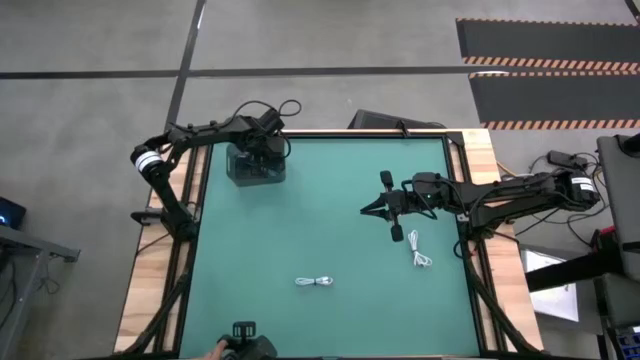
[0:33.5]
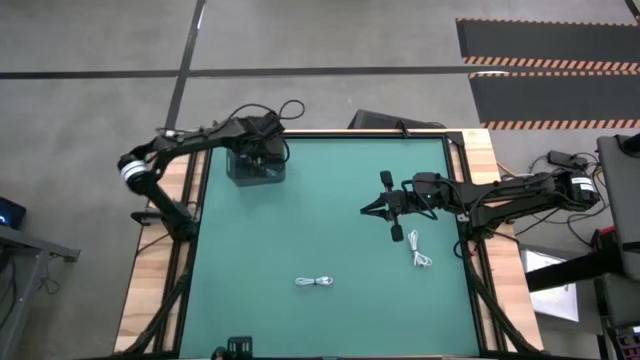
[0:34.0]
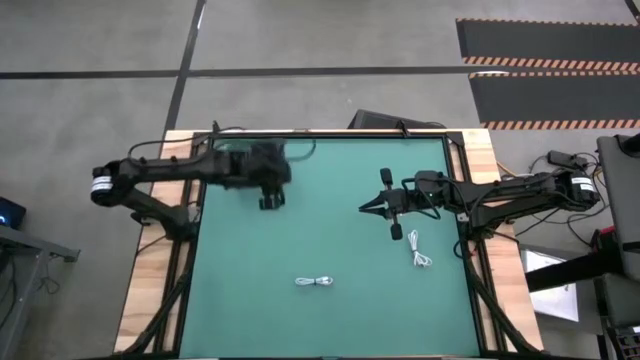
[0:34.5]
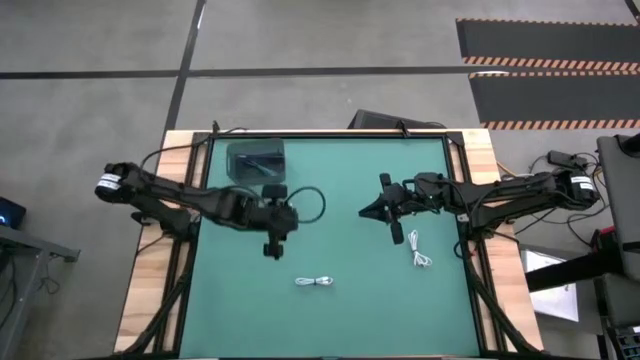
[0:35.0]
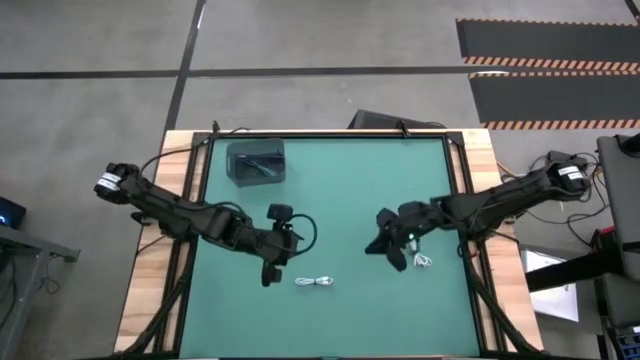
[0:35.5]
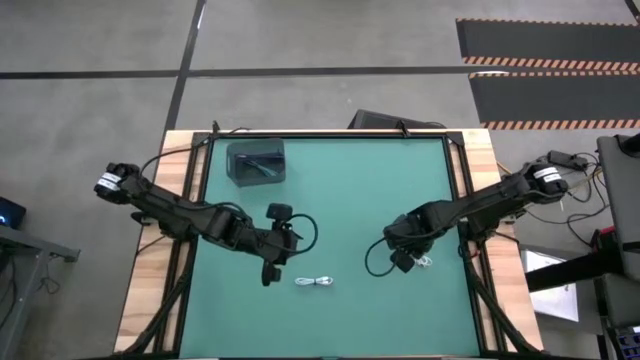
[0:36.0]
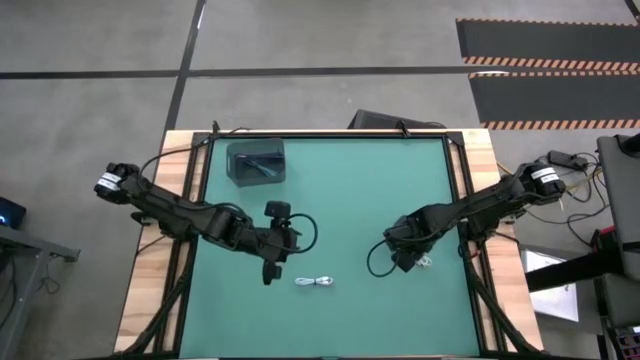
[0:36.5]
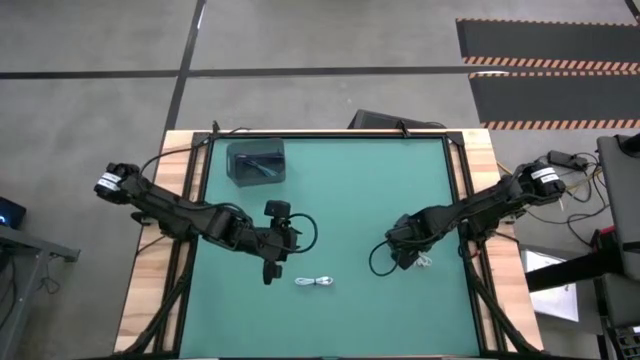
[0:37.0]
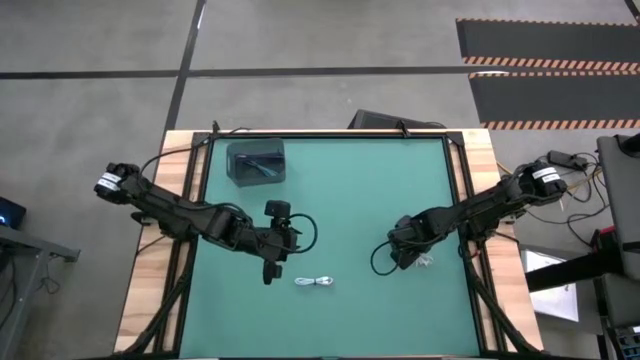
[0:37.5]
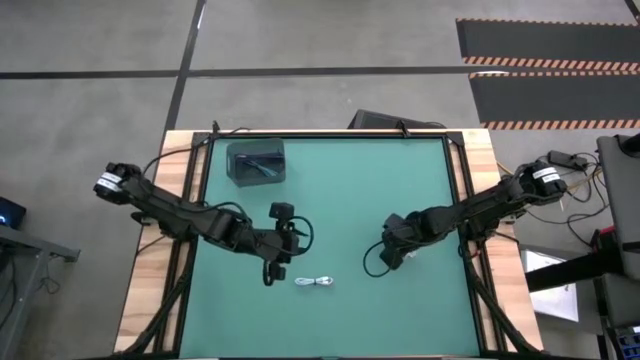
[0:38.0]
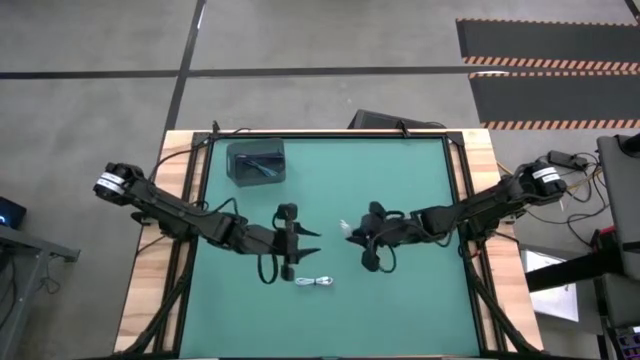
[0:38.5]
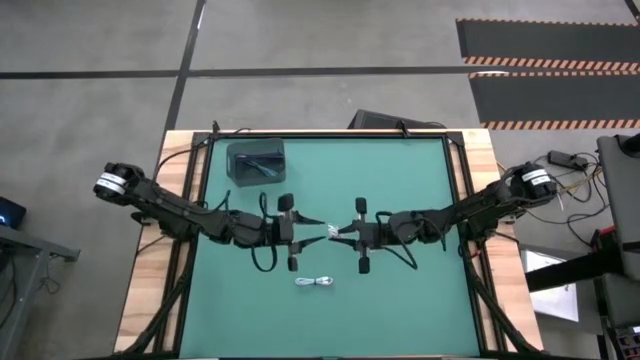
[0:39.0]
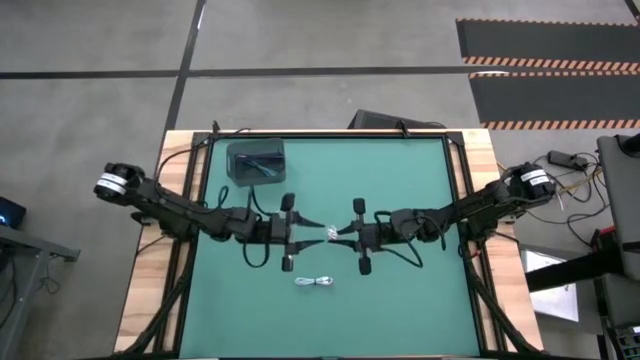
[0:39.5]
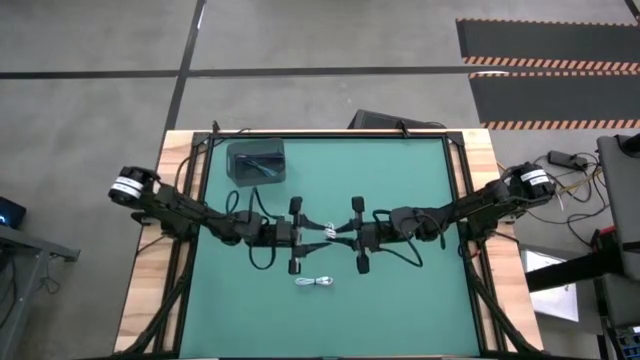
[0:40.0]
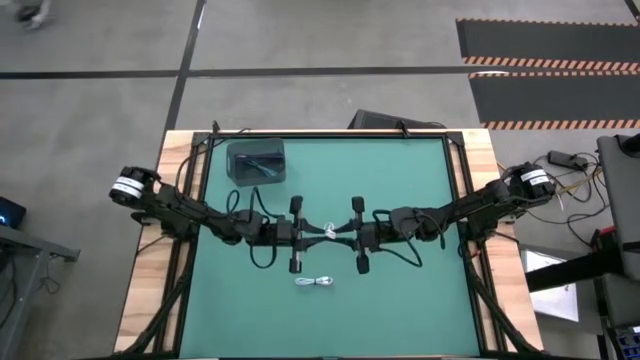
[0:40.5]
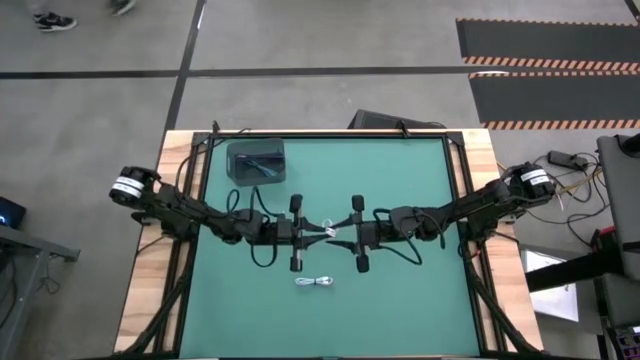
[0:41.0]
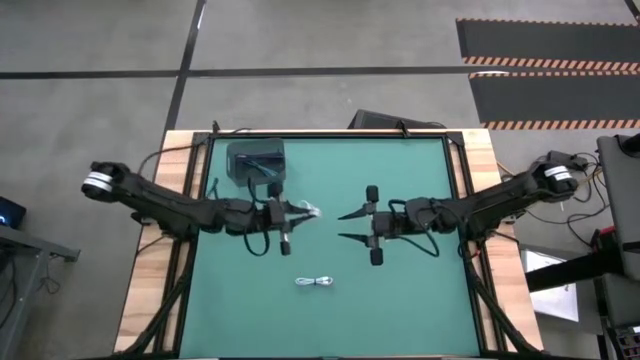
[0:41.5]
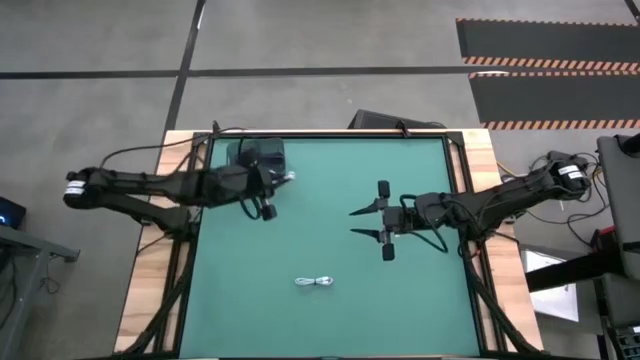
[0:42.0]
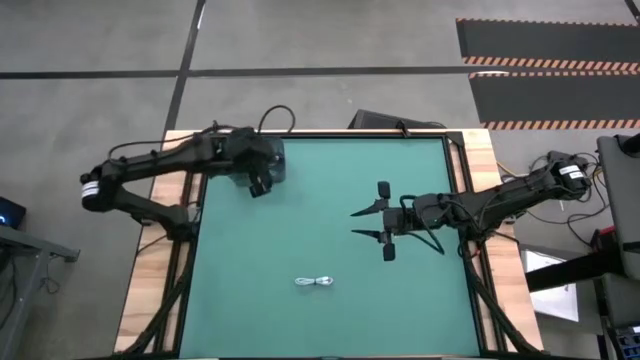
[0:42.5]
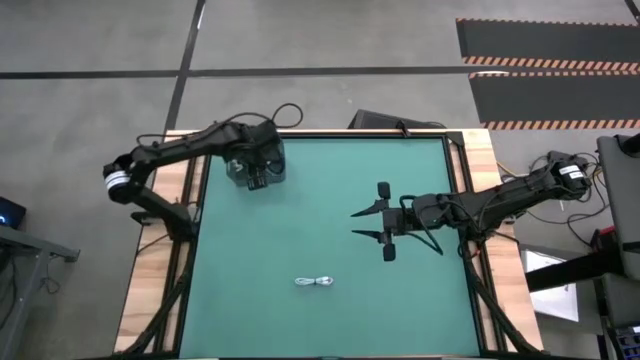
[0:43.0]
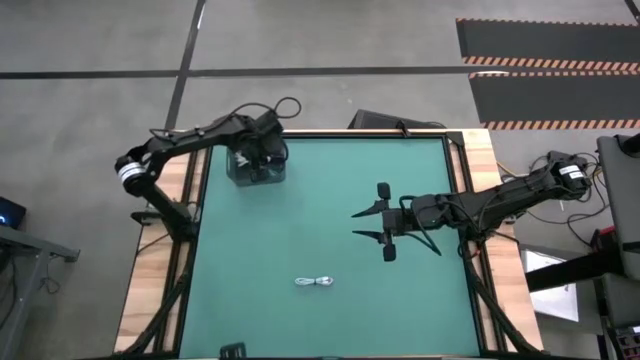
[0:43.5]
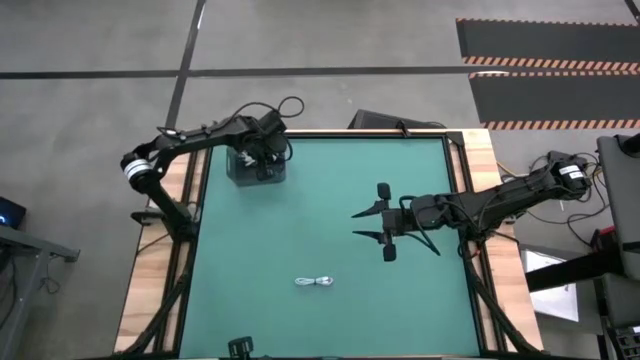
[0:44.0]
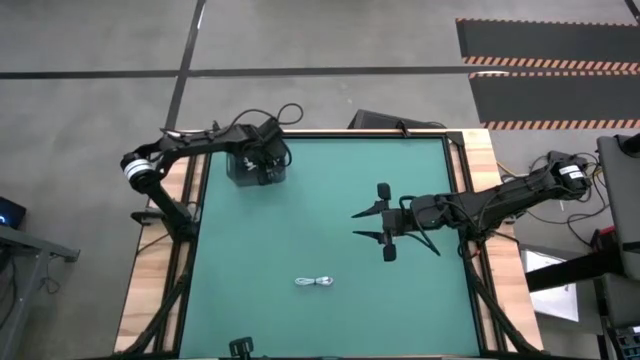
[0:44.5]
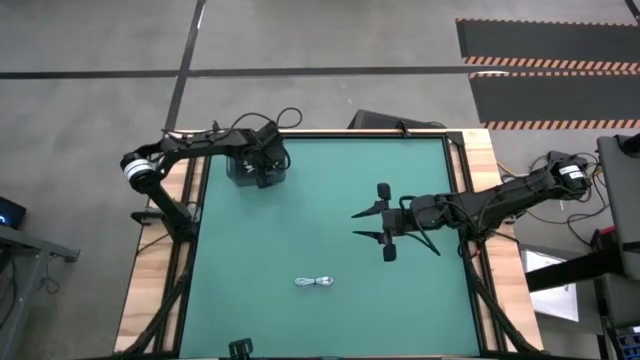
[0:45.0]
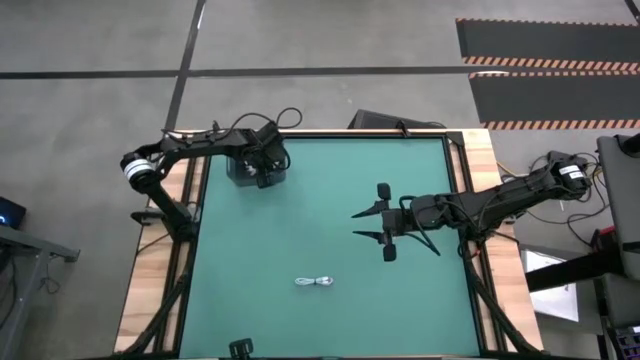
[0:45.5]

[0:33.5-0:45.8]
Task: Pick and place USB-C Cables
Put the right white charger cable into the black bin

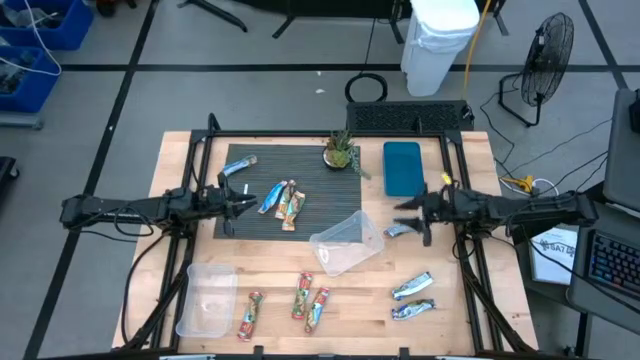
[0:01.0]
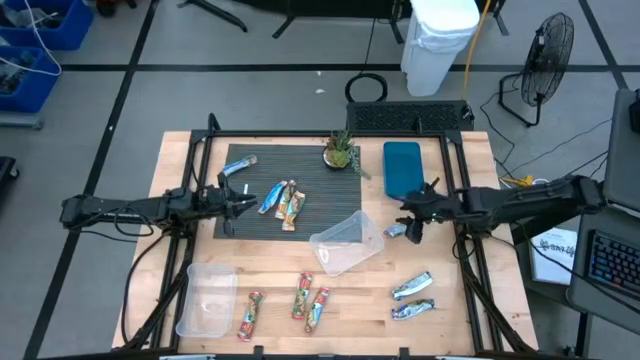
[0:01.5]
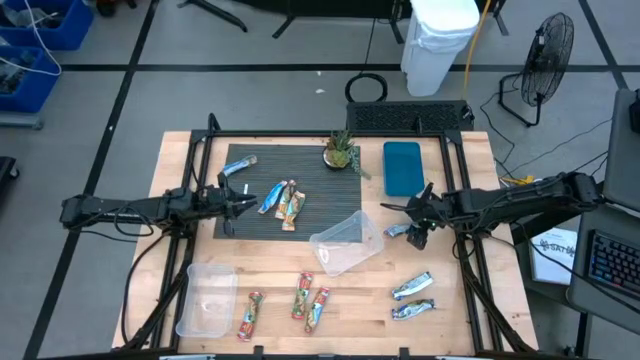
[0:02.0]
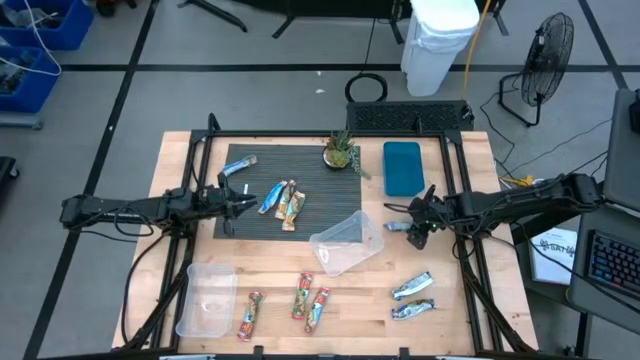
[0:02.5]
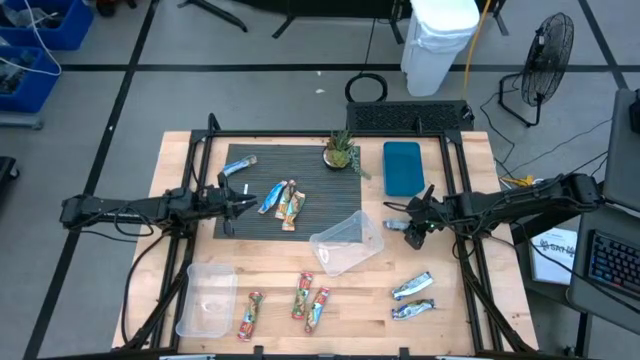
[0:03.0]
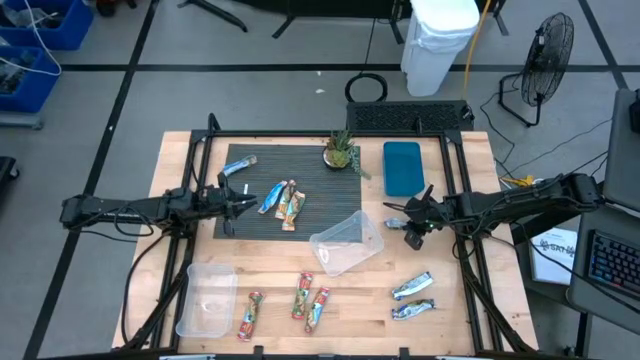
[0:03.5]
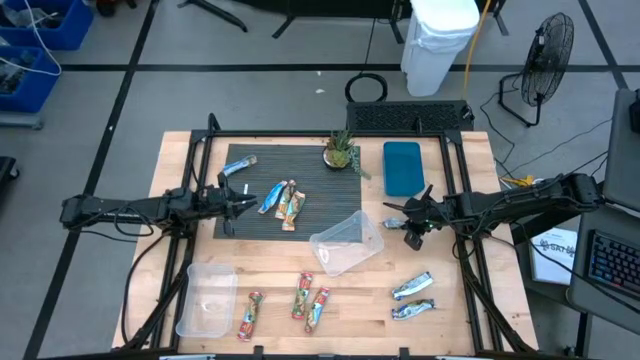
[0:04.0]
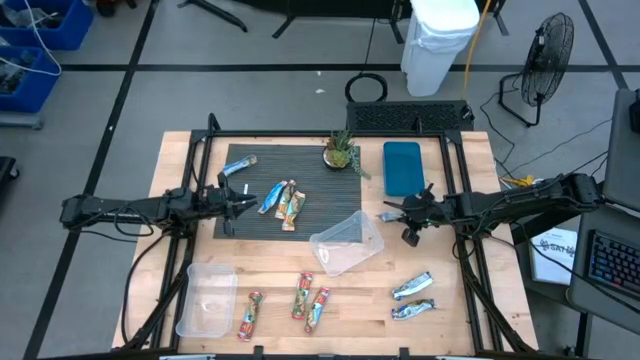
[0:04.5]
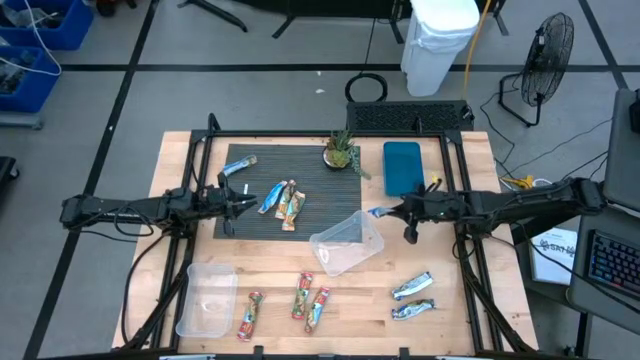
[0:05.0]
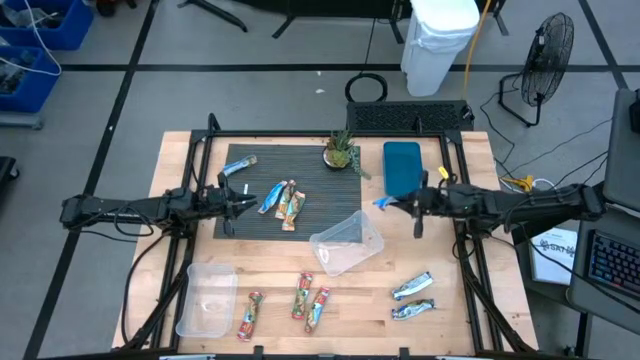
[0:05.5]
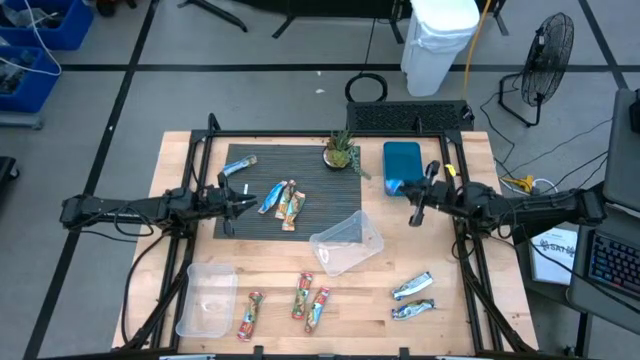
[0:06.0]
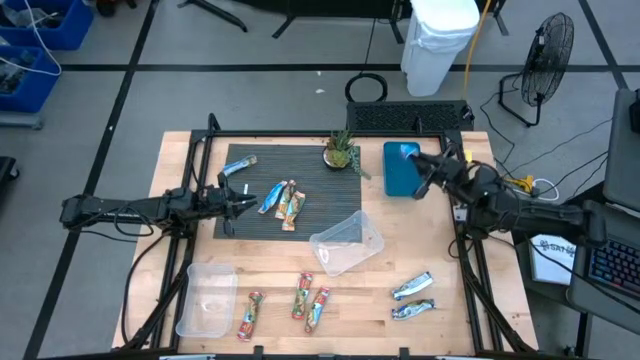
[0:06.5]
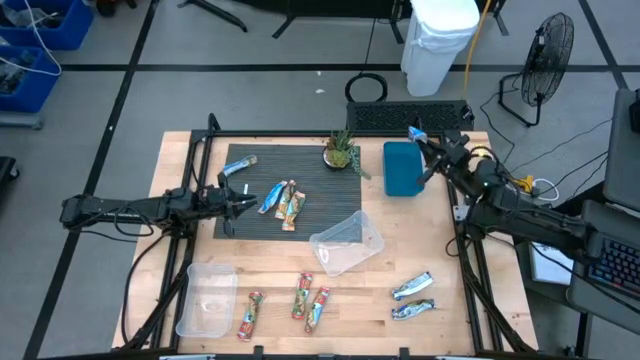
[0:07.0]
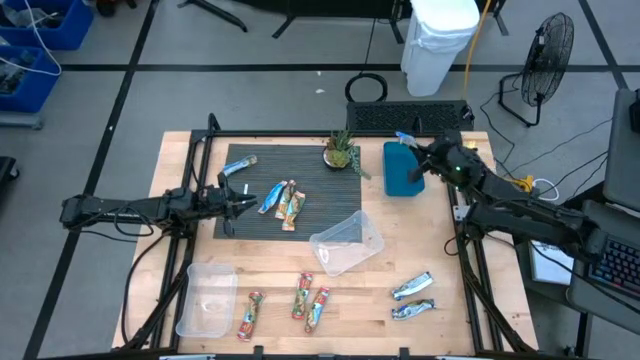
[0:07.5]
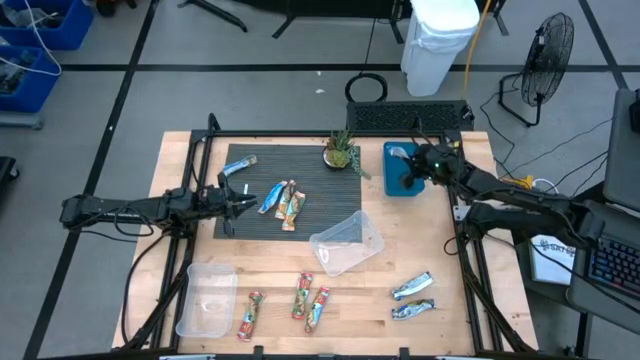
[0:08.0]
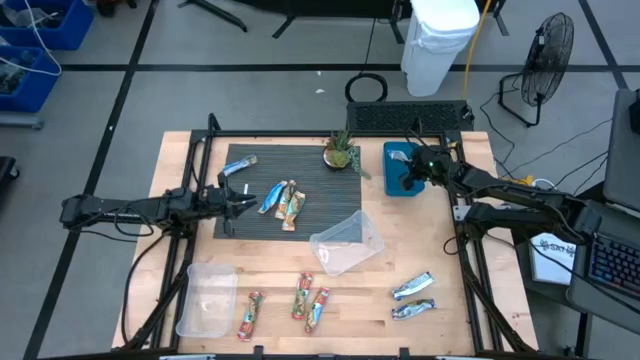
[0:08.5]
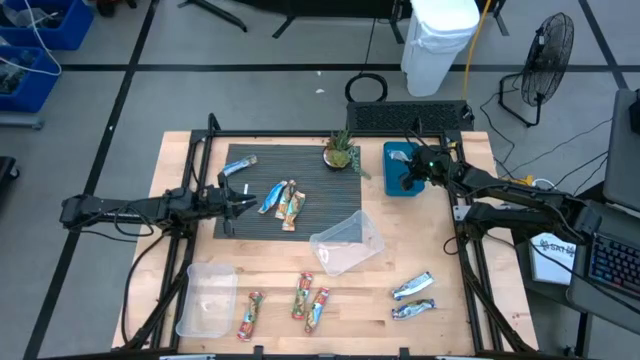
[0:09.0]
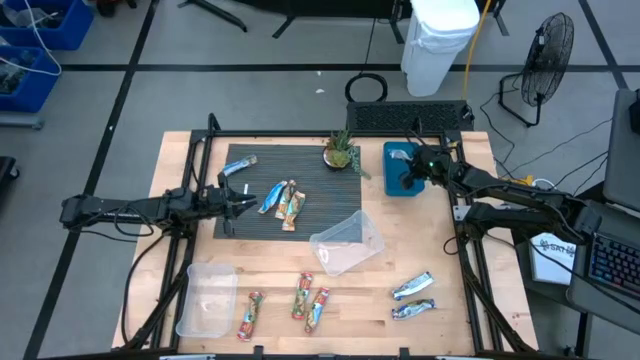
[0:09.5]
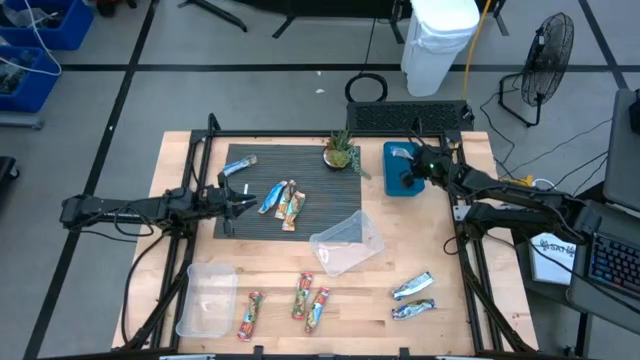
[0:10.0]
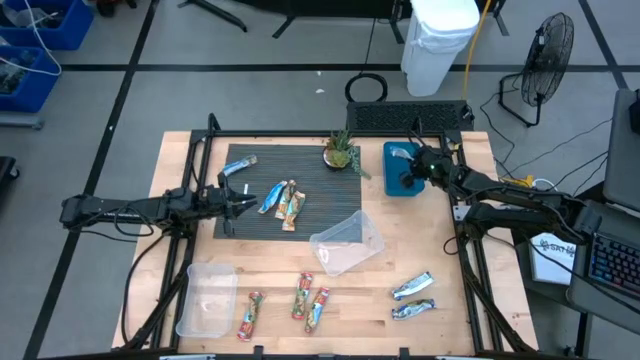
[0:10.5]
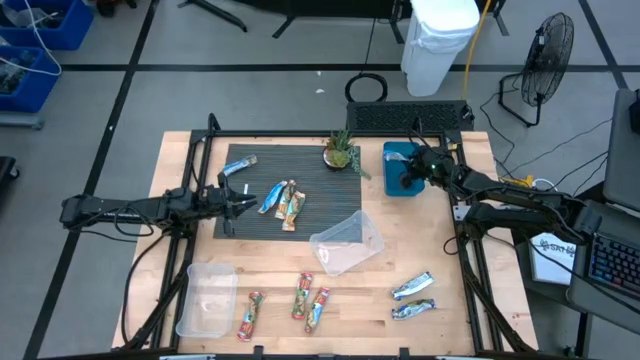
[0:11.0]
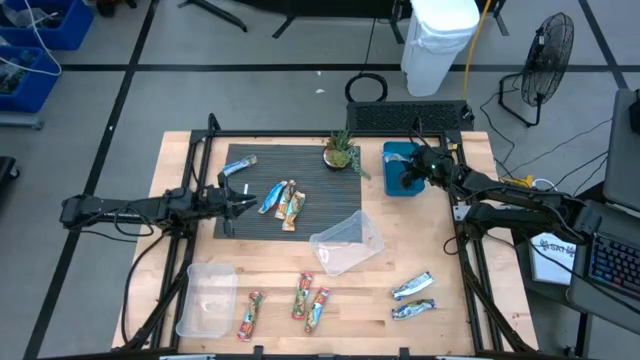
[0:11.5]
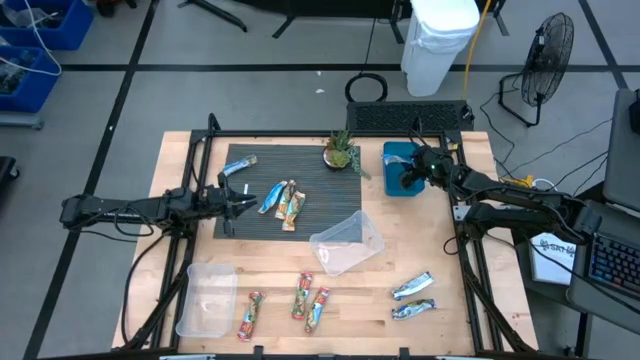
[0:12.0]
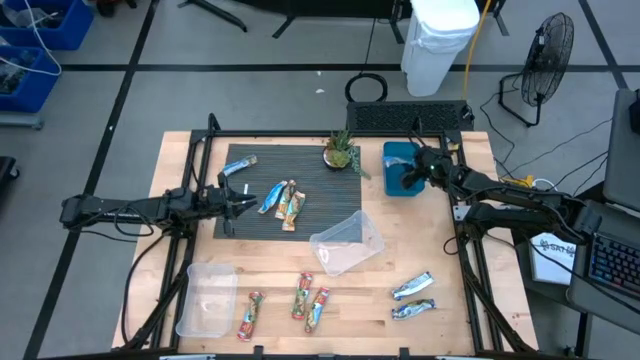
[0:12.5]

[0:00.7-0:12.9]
Task: Pick and place Granola Bars by type
Put the top blue granola bar into the blue bin
